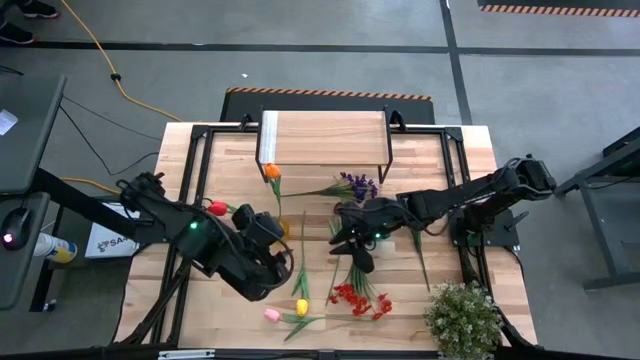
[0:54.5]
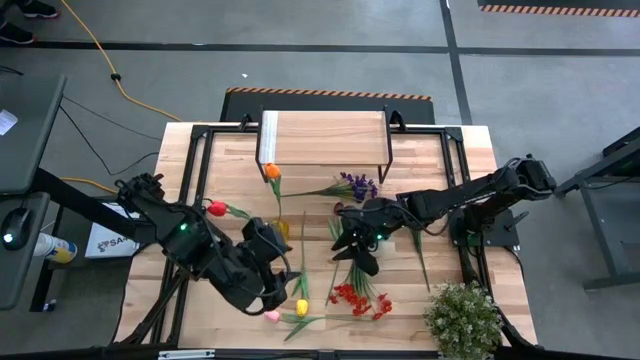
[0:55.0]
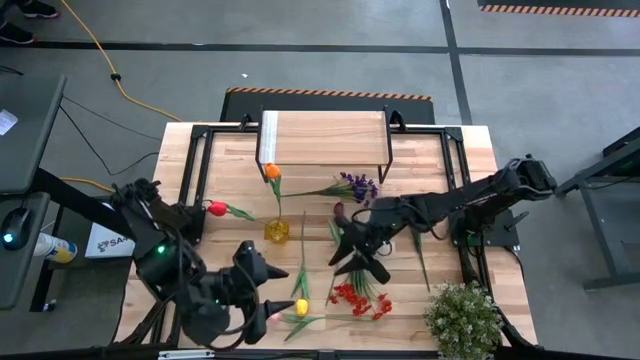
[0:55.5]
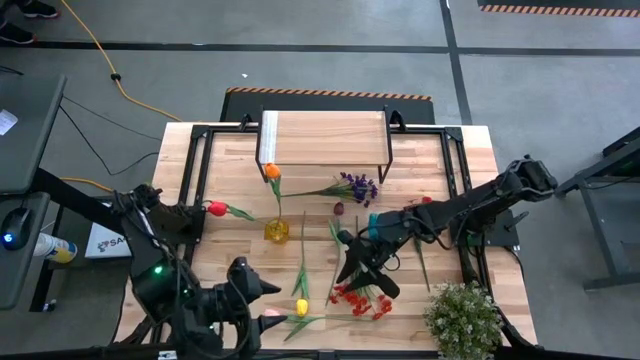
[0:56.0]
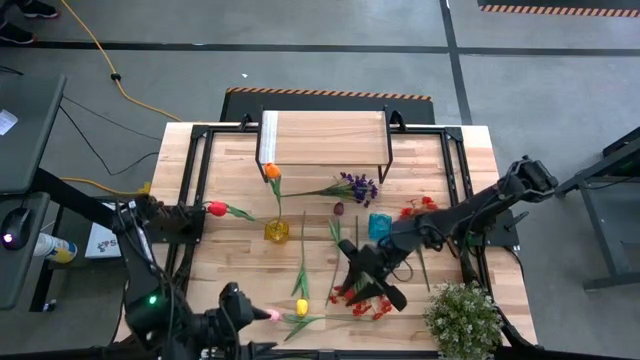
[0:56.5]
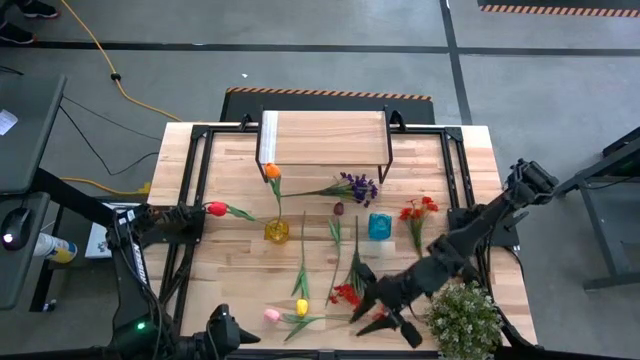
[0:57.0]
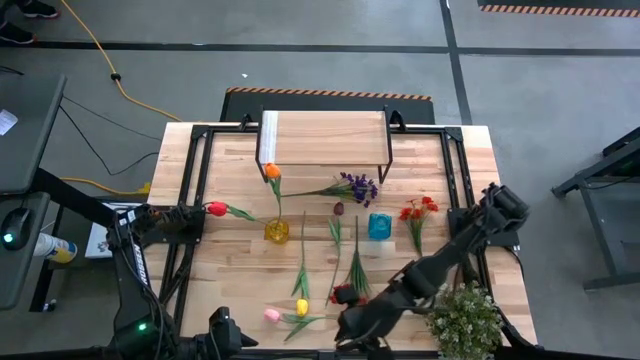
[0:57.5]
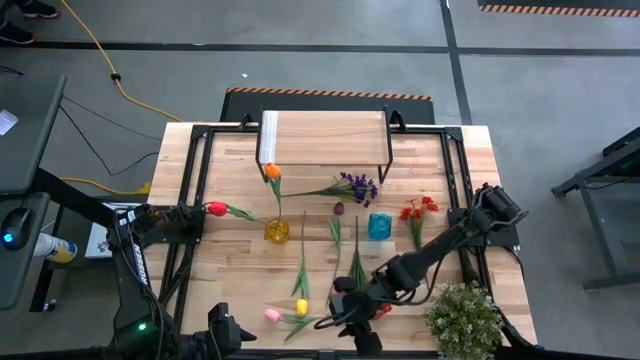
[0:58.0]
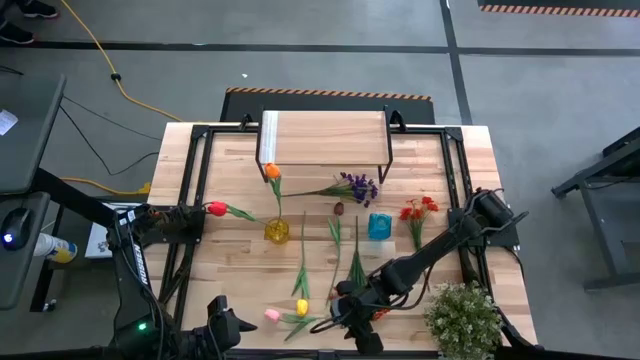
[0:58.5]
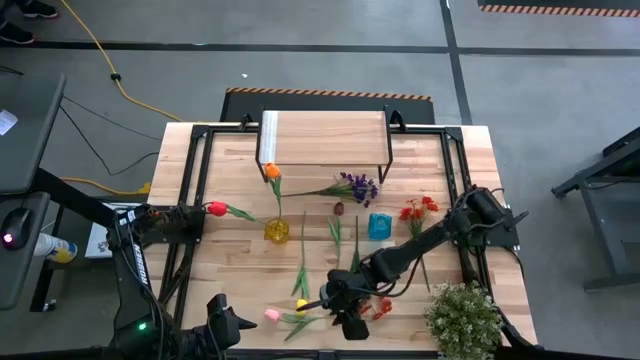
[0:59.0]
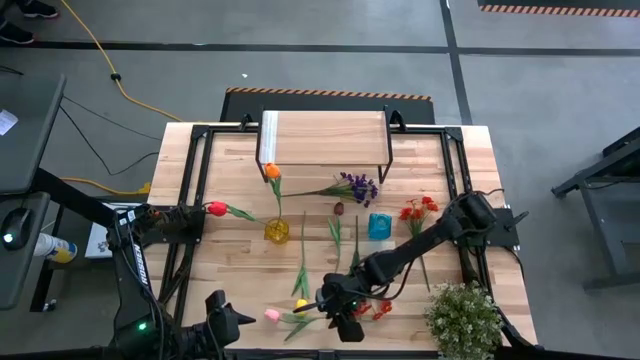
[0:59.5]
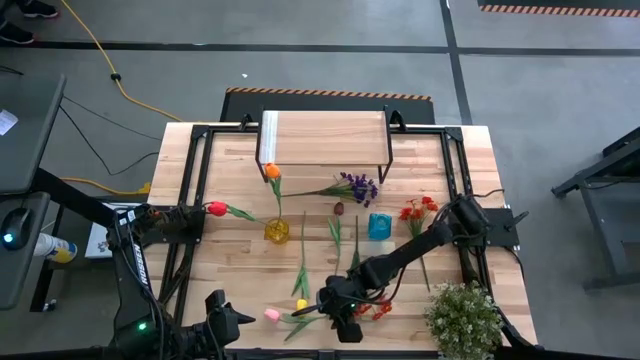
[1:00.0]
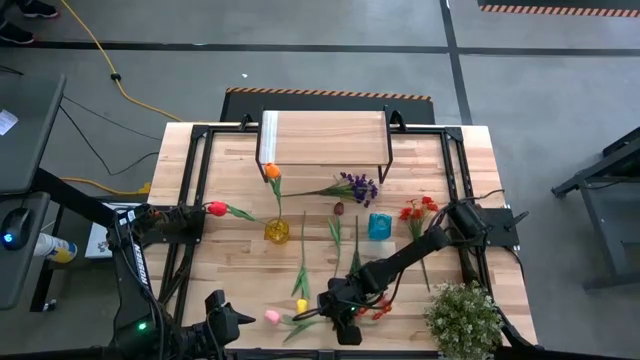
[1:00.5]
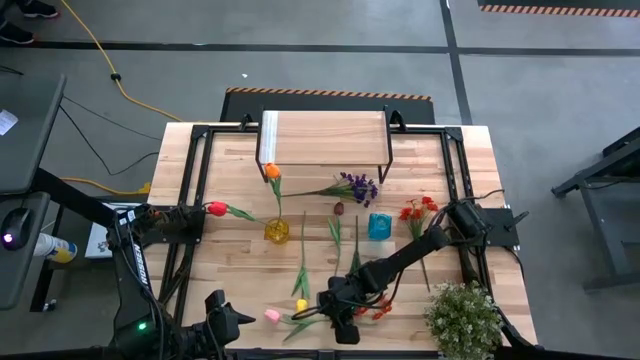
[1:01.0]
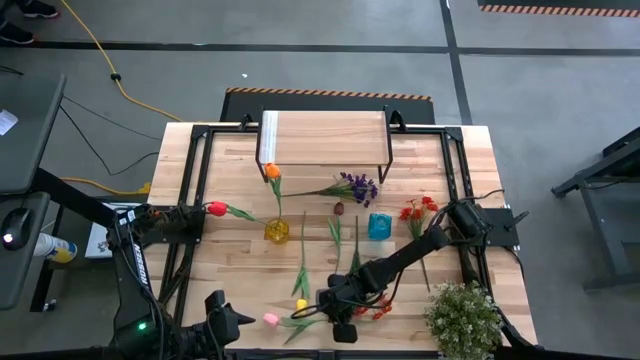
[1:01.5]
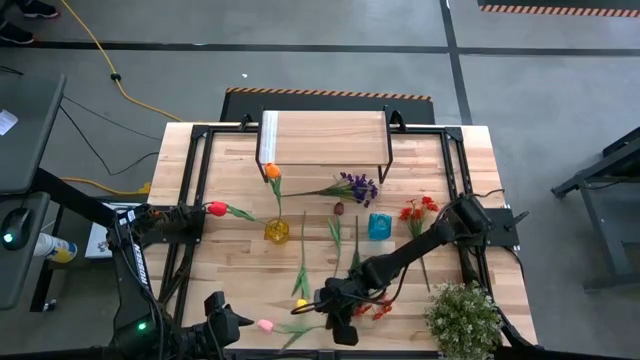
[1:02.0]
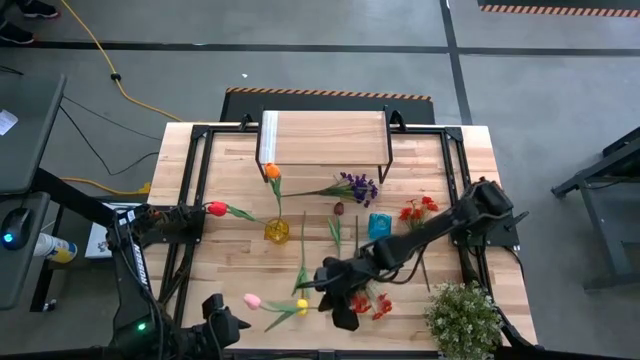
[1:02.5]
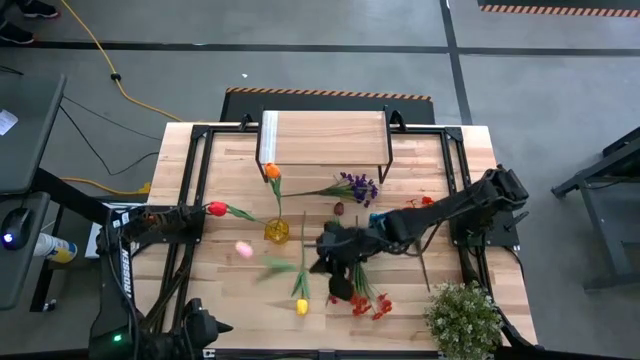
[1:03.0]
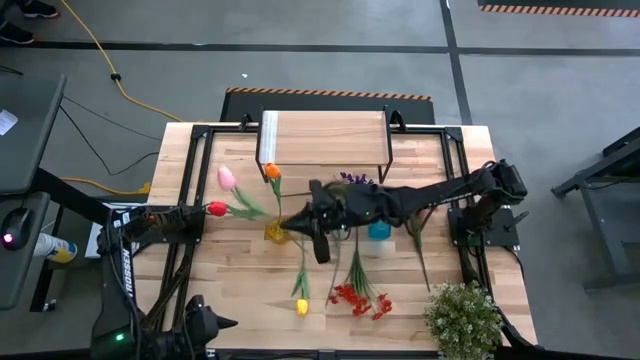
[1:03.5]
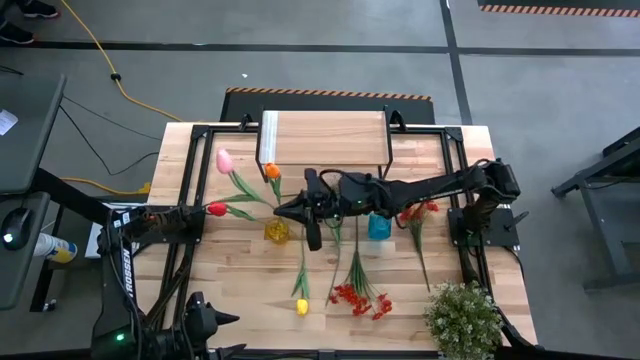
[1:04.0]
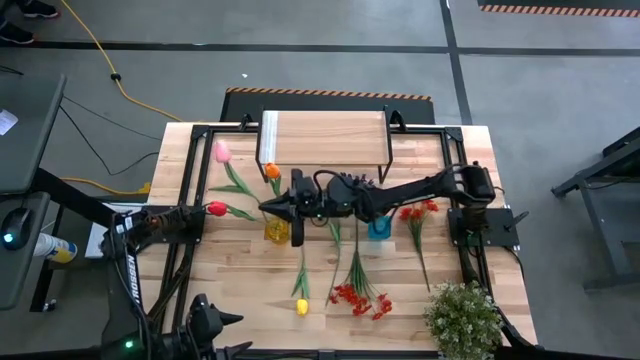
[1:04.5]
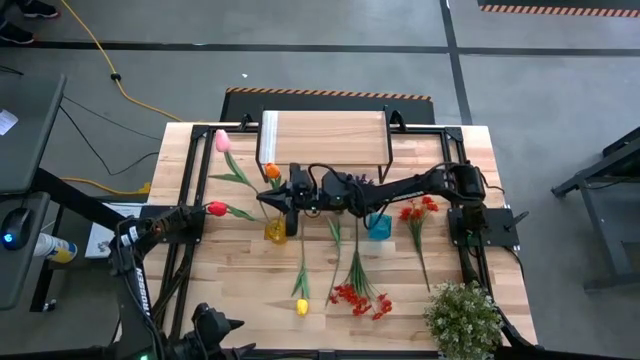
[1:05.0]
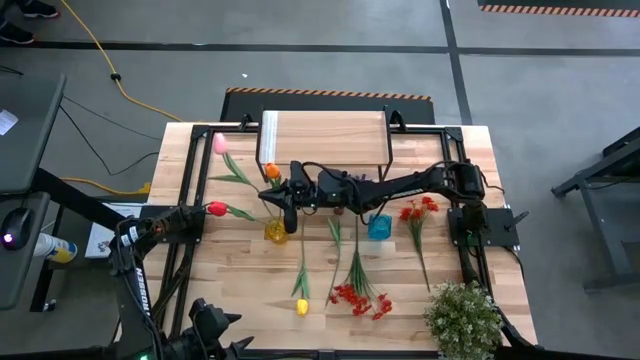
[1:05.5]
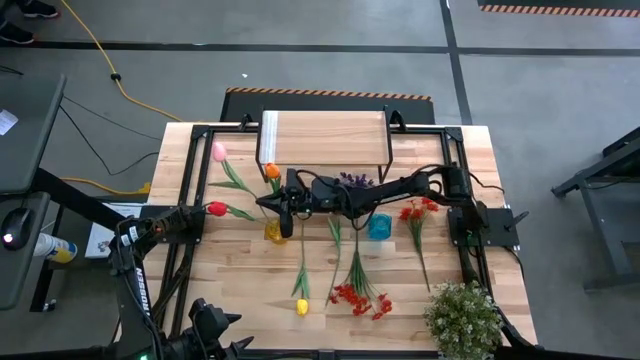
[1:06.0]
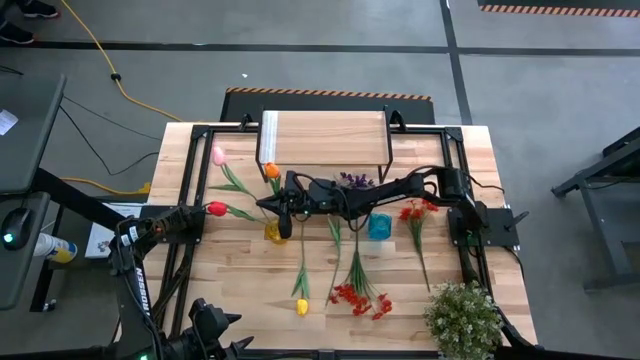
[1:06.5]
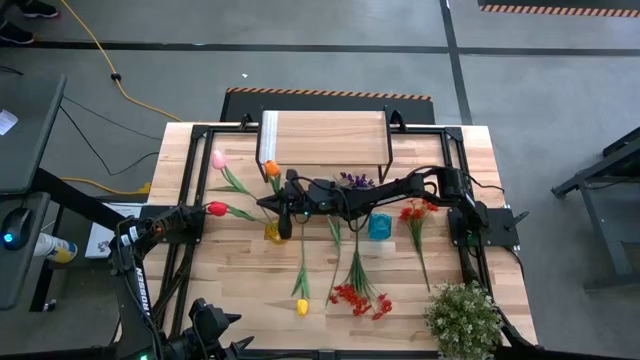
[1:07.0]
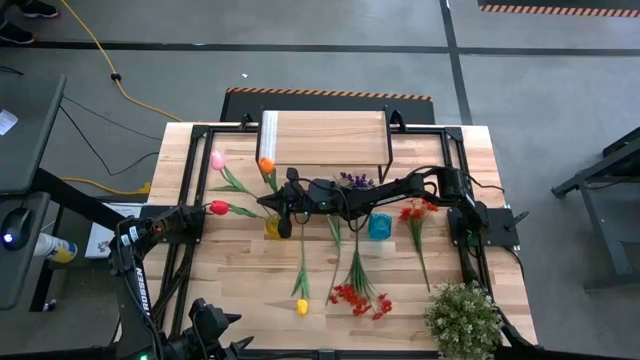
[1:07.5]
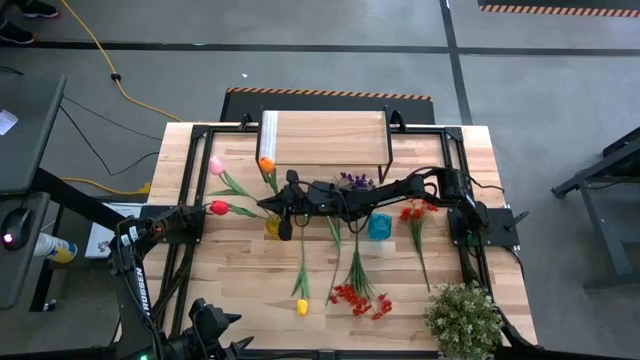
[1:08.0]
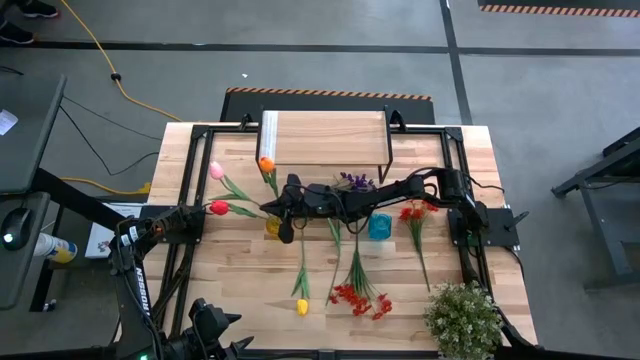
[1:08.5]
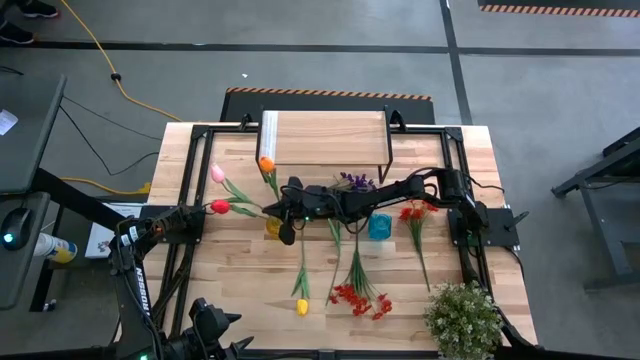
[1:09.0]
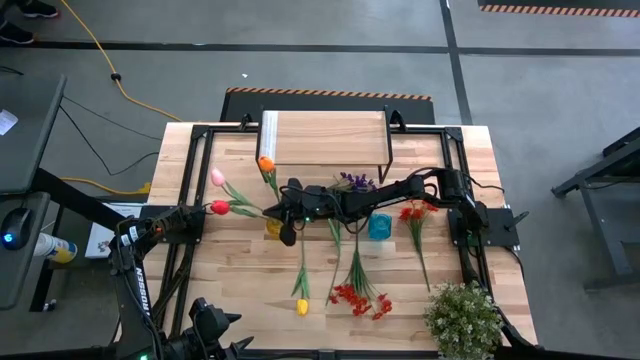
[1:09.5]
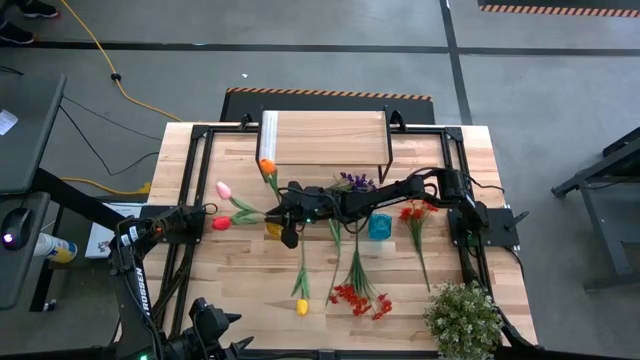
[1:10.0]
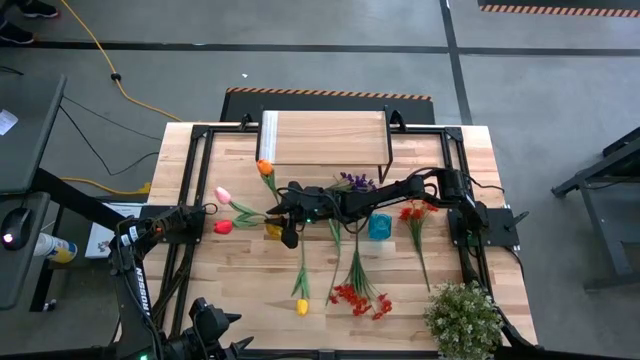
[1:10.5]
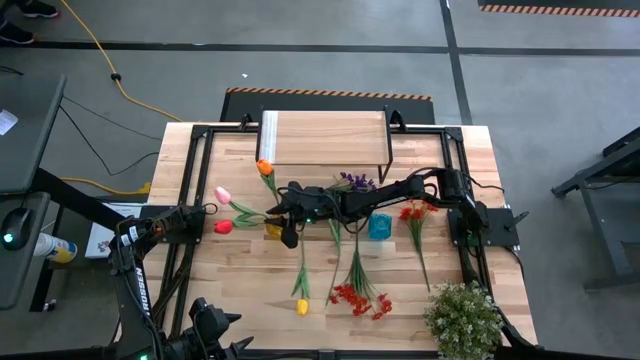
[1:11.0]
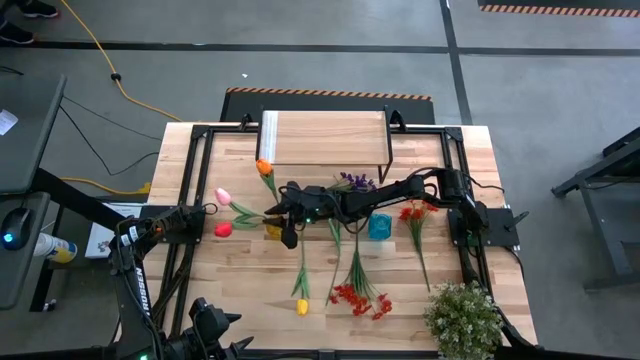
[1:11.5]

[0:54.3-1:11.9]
Task: Pick and place flowers into a vace then onto a shelf
Put the pink tulip into the yellow vase

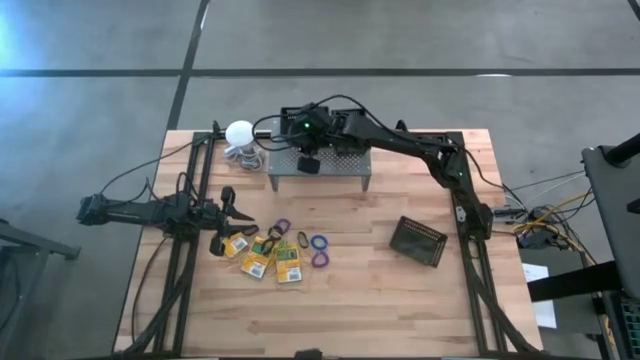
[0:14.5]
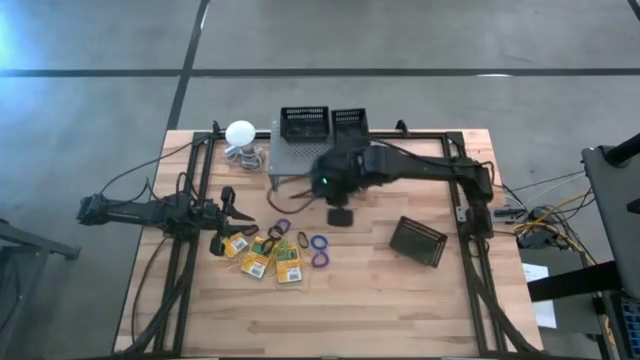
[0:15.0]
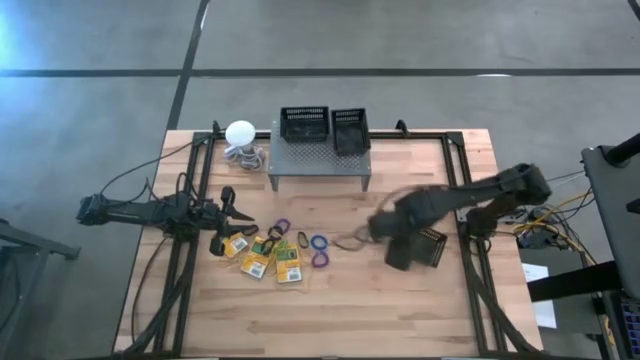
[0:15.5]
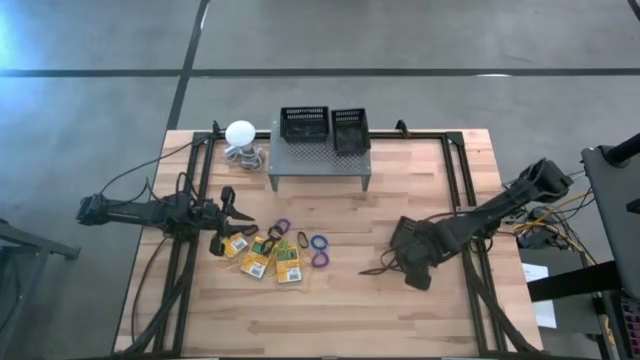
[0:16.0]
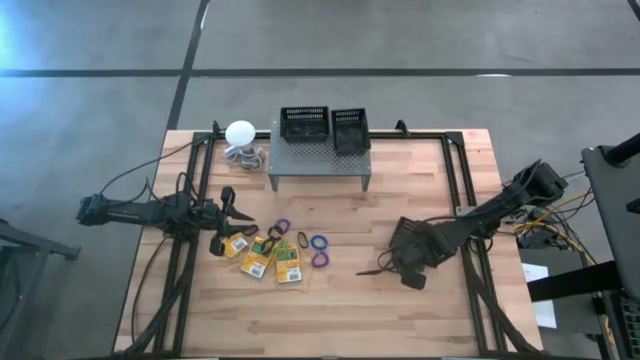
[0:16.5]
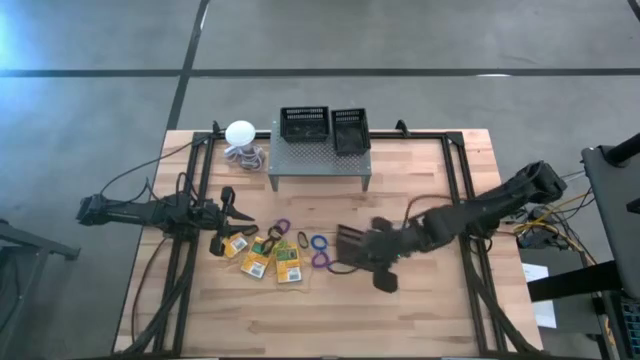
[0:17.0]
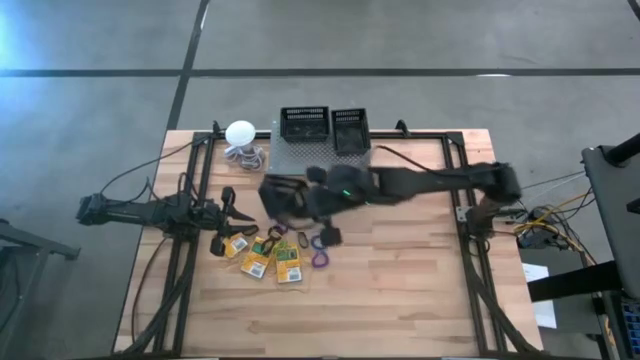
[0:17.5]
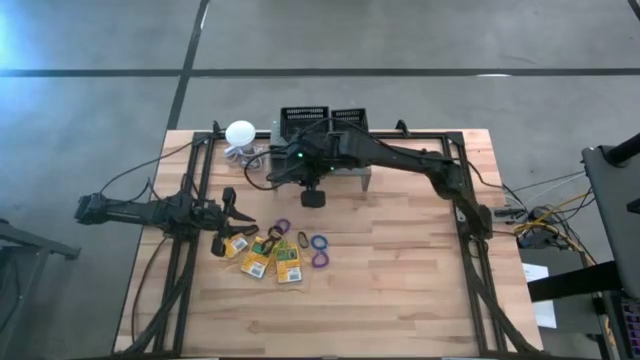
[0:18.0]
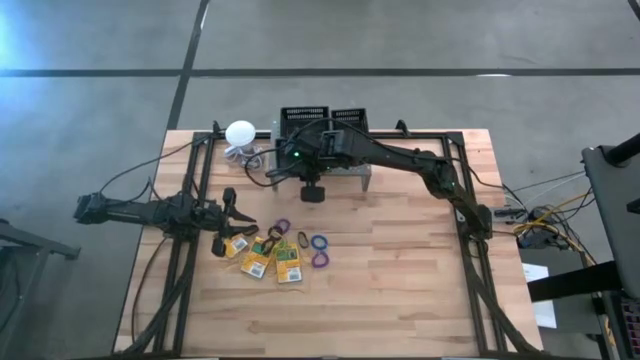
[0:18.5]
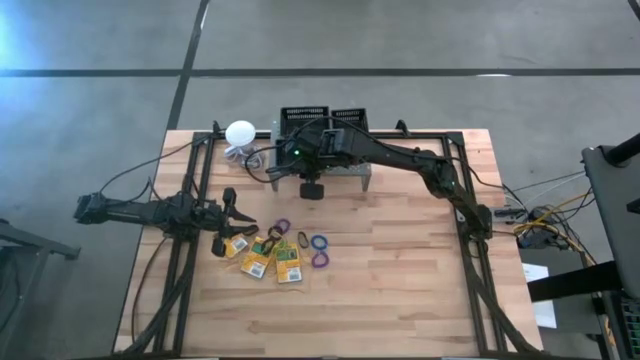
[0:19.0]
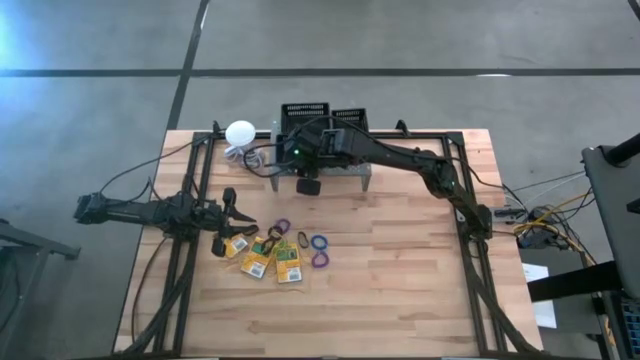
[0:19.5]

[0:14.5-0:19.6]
Task: Pick & Place Office Desk Supplies
Put the black bin on the shelf
